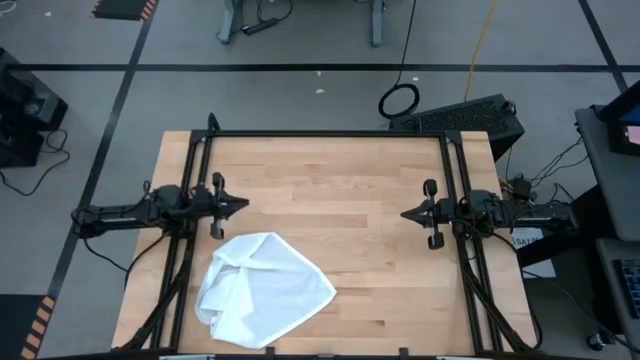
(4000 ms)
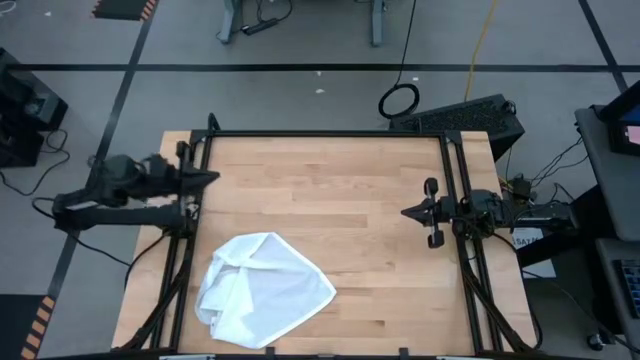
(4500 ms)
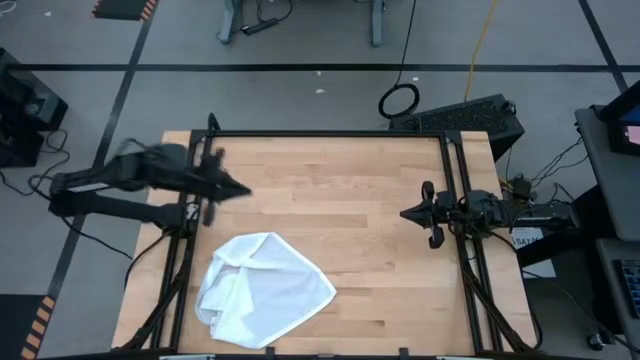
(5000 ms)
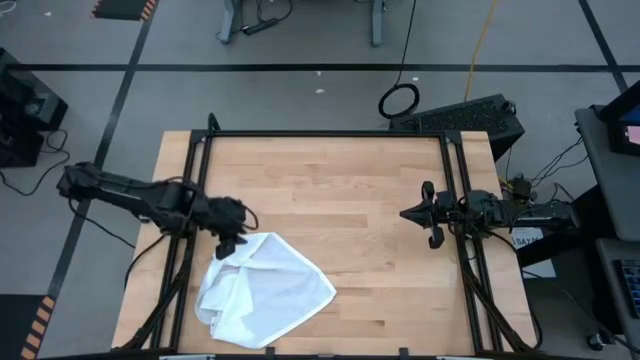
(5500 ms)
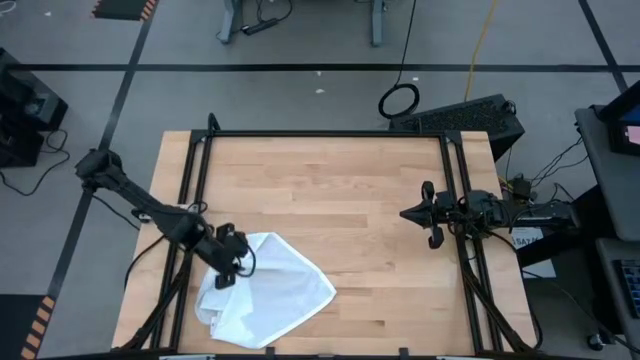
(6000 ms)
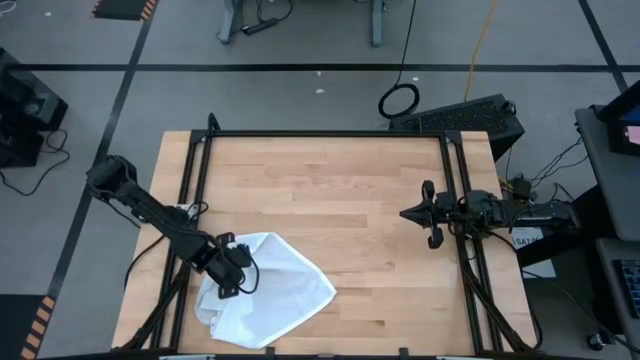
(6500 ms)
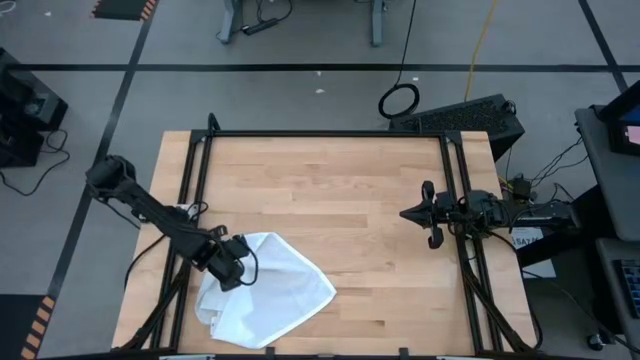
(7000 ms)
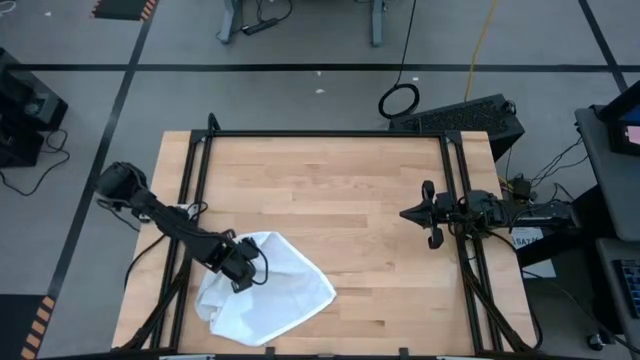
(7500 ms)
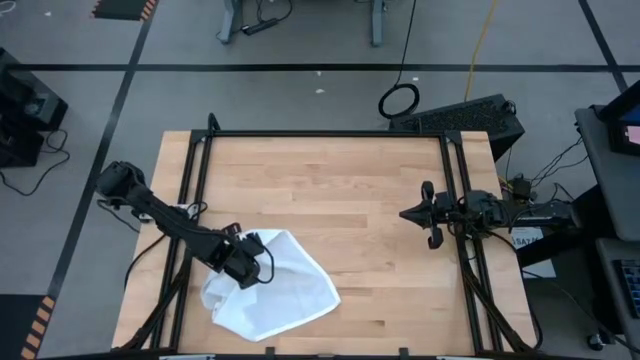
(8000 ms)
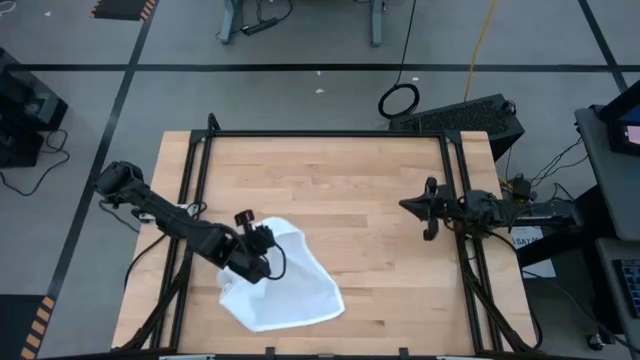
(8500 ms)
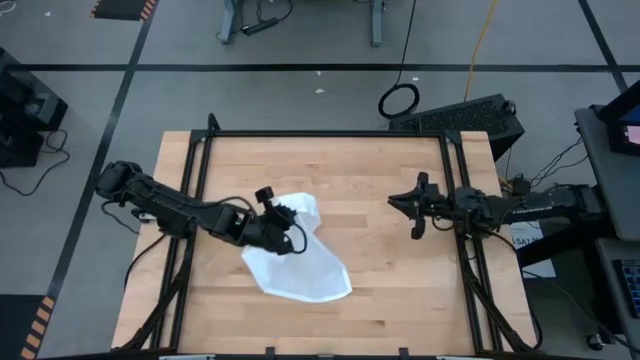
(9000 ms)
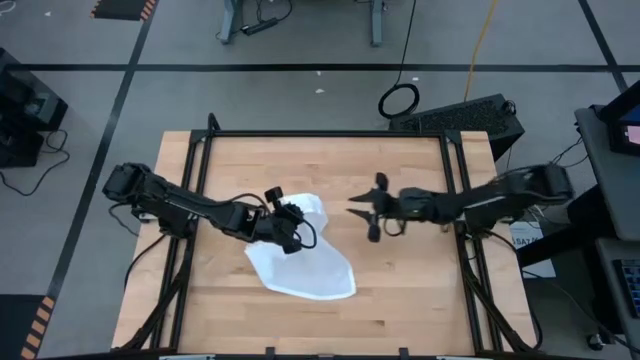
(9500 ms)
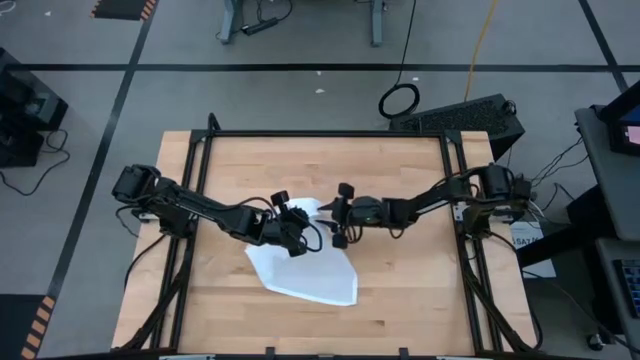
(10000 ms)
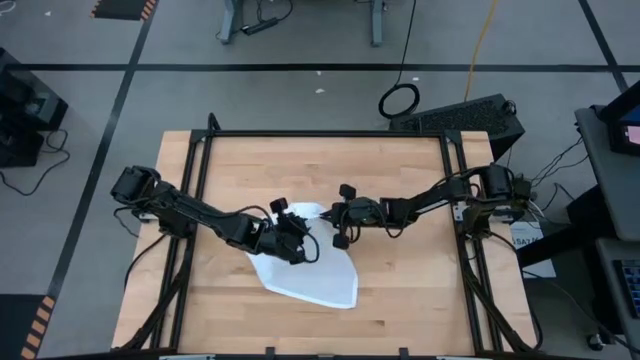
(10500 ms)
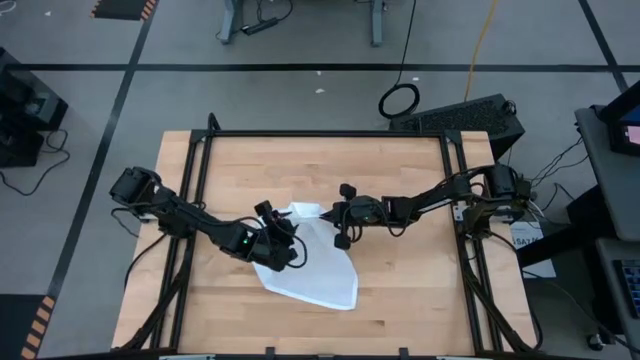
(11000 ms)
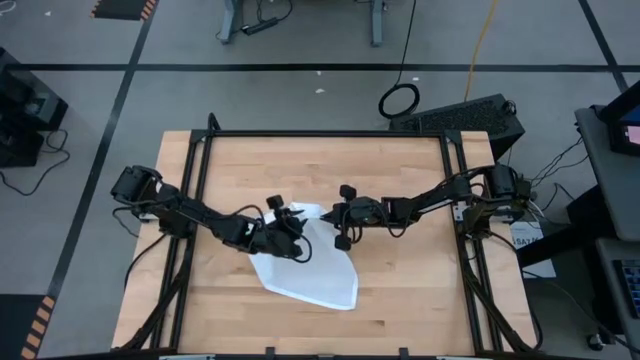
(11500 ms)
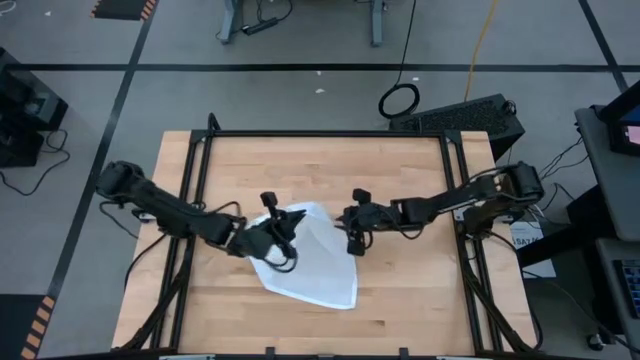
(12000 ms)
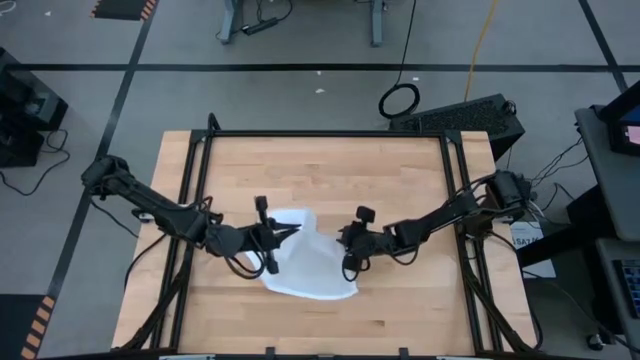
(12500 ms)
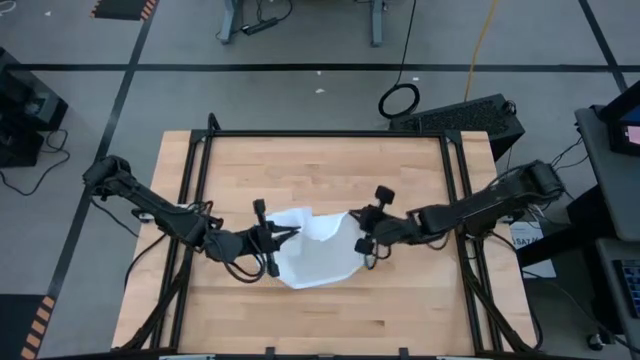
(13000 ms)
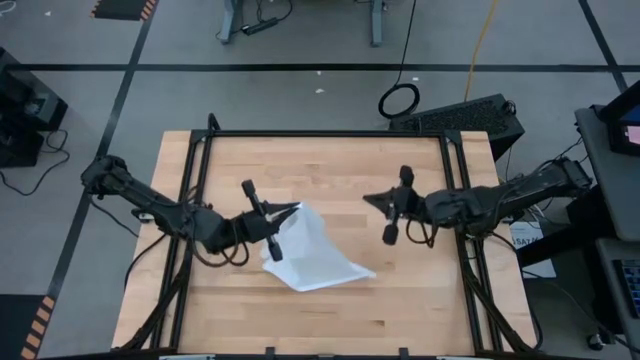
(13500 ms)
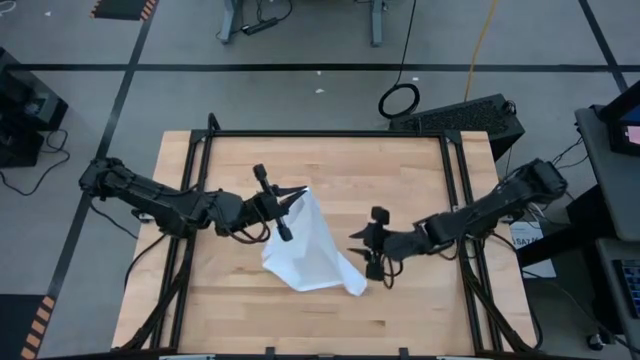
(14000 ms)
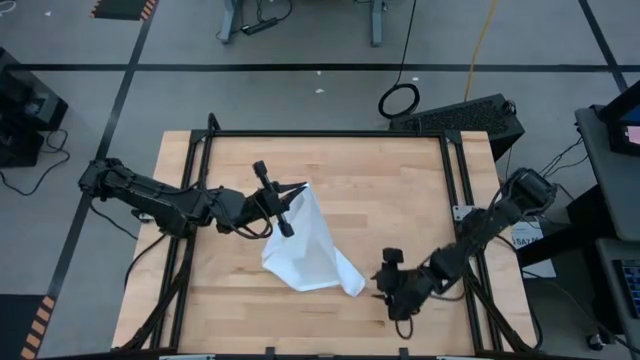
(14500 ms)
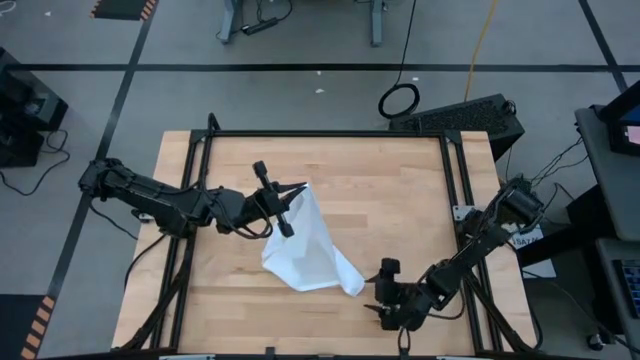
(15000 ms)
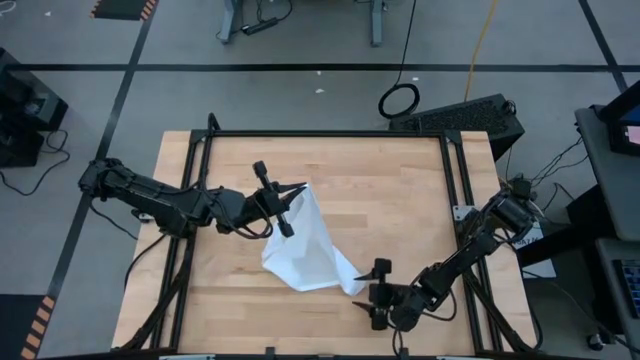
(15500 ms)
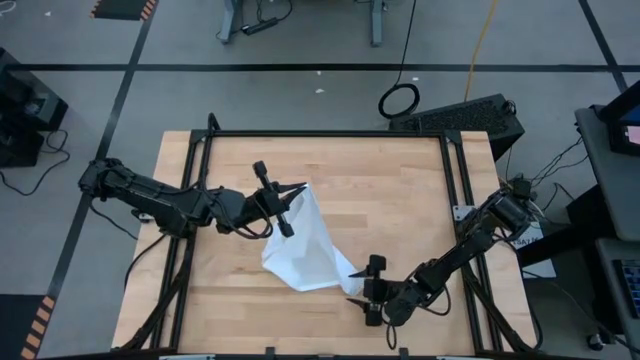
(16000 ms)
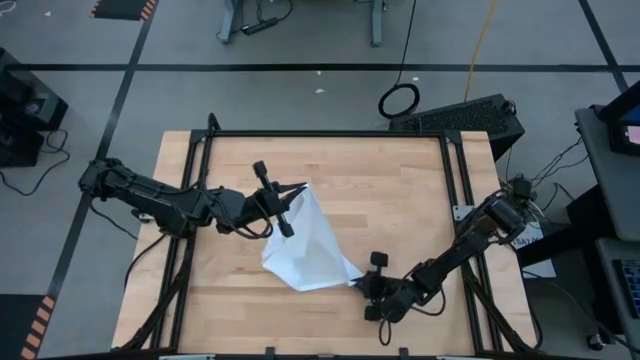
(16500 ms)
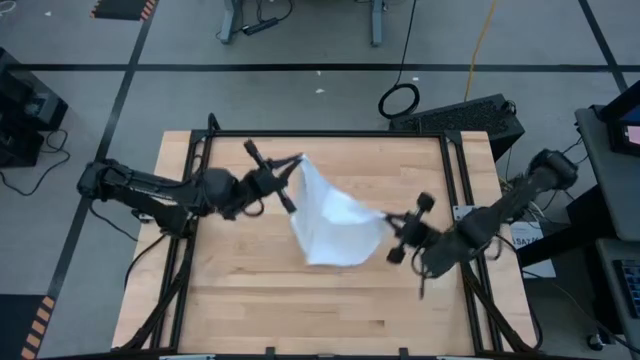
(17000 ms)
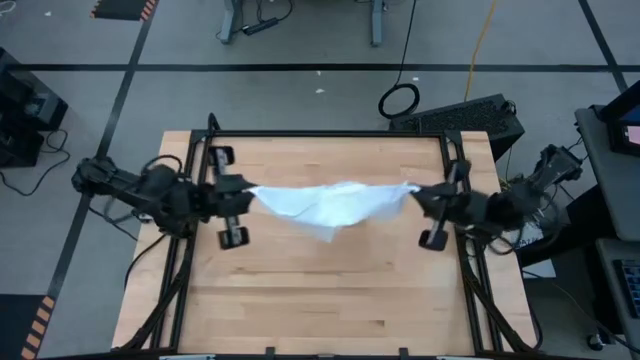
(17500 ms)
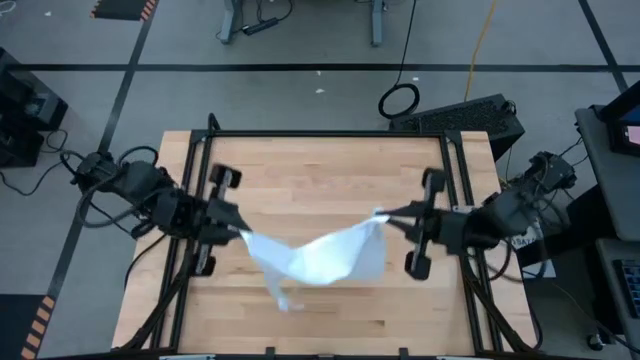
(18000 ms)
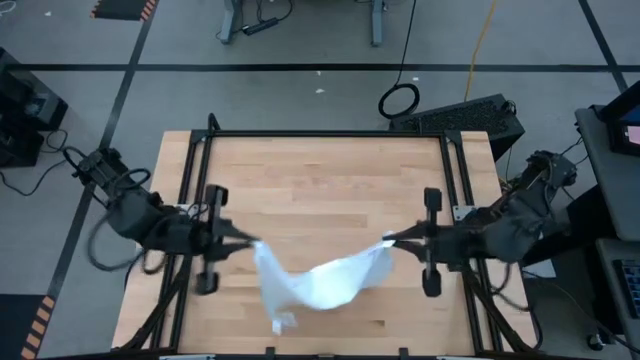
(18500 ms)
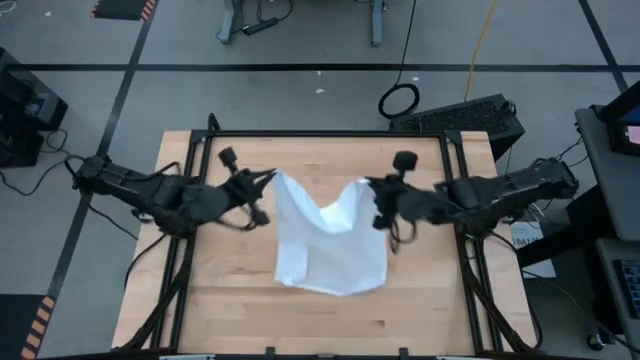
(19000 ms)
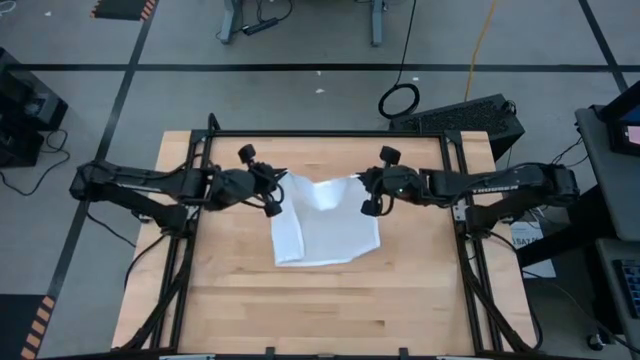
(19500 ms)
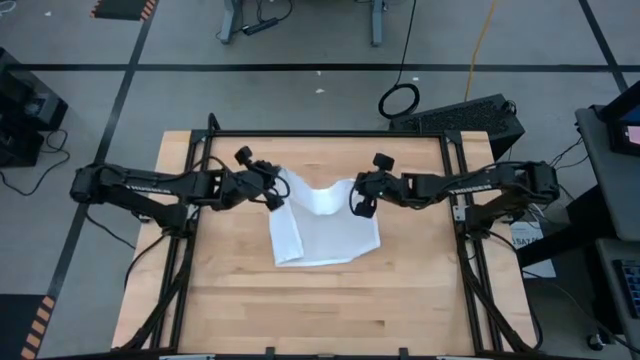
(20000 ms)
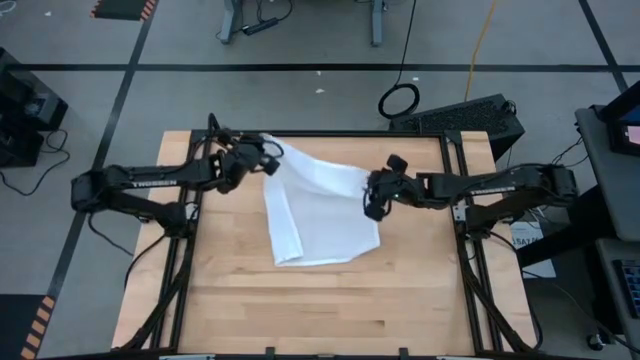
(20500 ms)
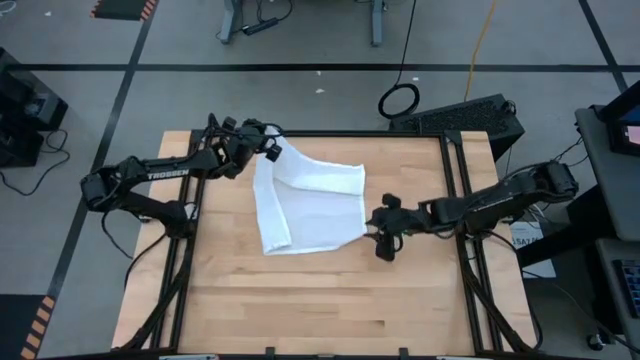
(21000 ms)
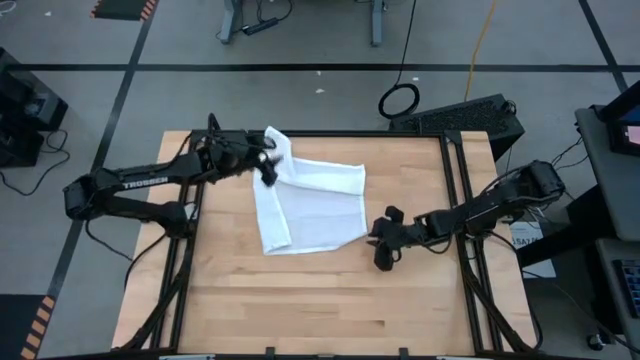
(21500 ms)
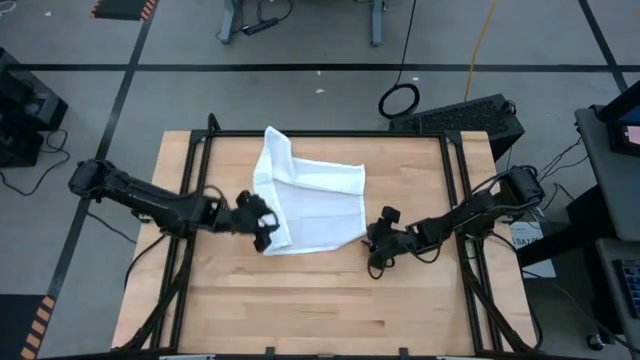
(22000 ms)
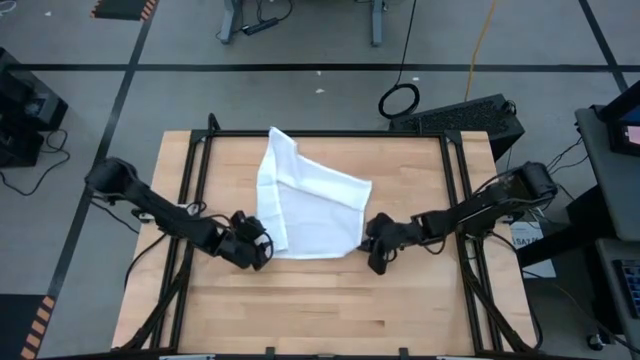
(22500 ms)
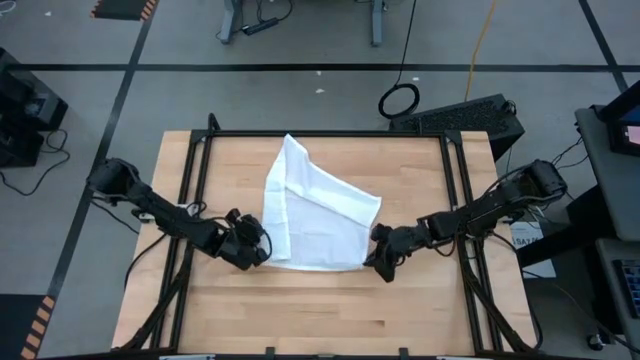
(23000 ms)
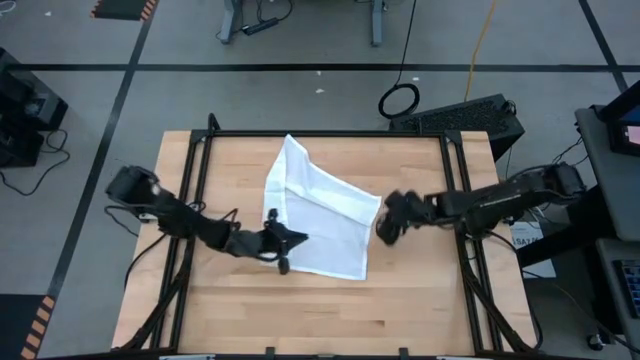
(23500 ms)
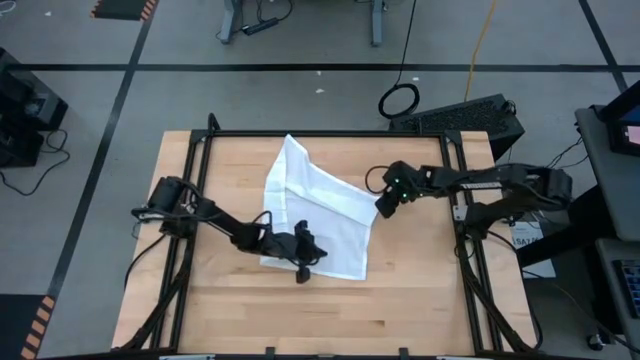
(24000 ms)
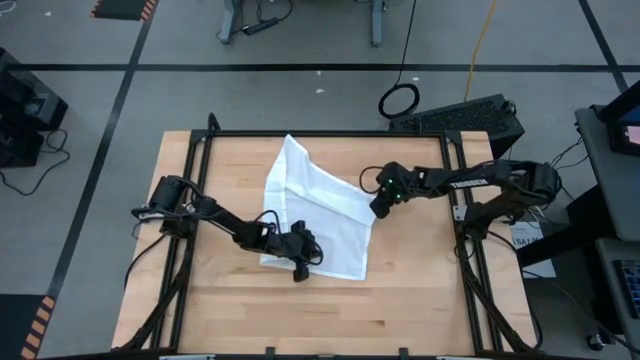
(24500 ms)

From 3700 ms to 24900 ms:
Task: Roll napkin
Fold the white table napkin
